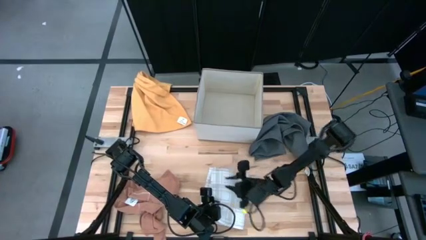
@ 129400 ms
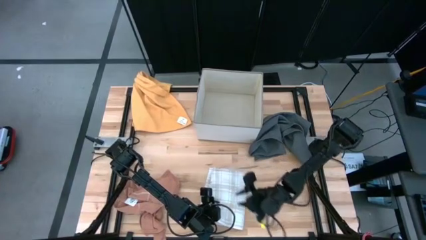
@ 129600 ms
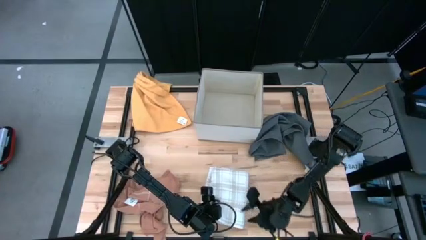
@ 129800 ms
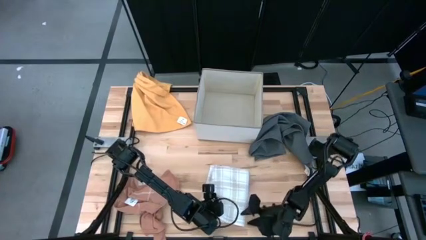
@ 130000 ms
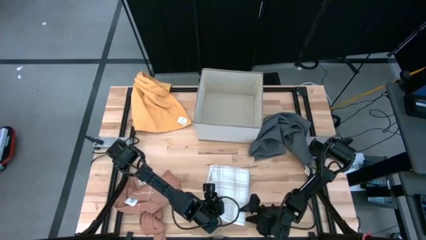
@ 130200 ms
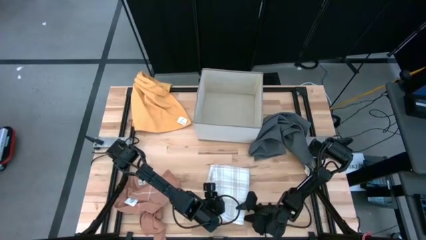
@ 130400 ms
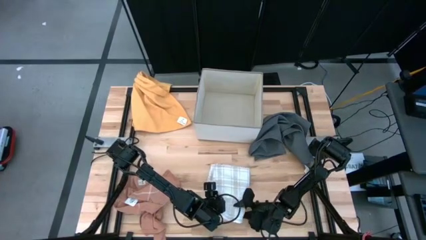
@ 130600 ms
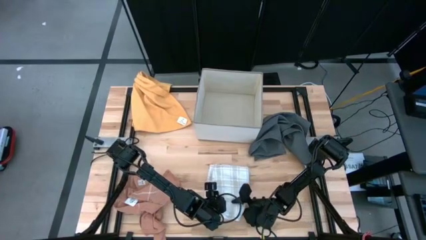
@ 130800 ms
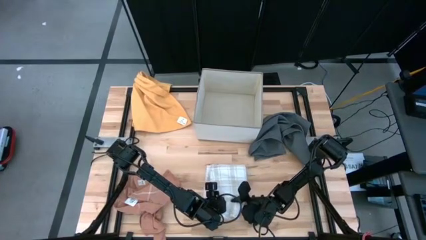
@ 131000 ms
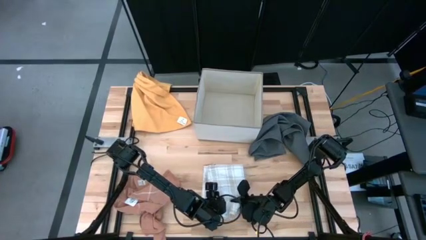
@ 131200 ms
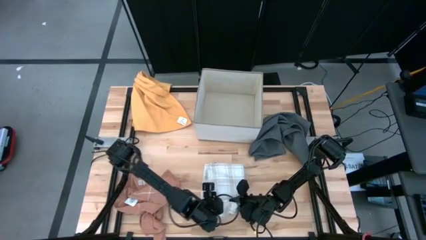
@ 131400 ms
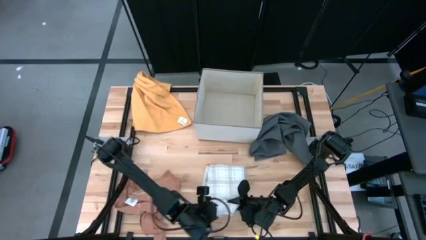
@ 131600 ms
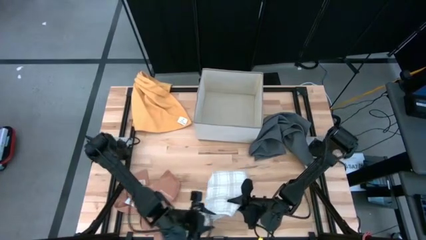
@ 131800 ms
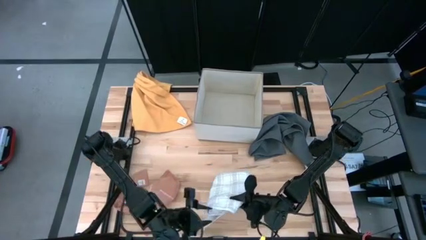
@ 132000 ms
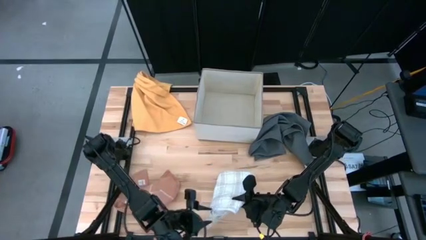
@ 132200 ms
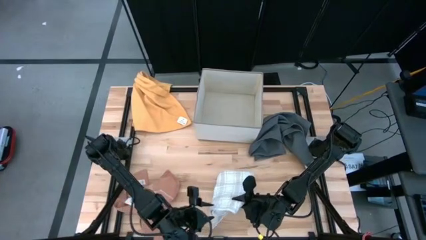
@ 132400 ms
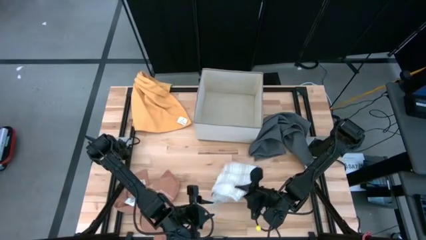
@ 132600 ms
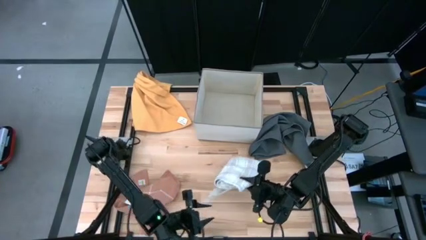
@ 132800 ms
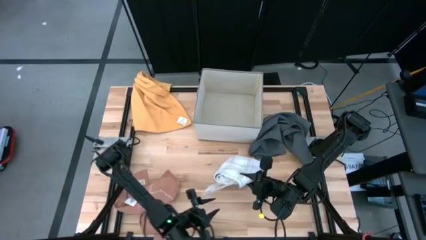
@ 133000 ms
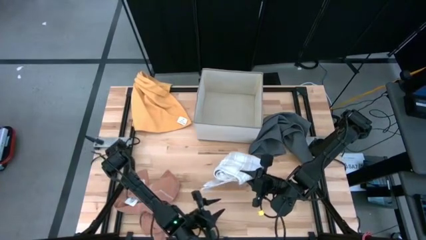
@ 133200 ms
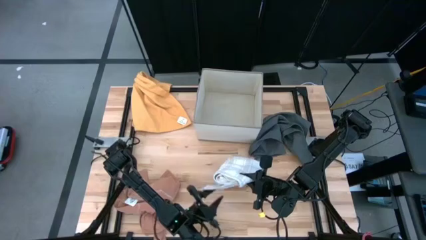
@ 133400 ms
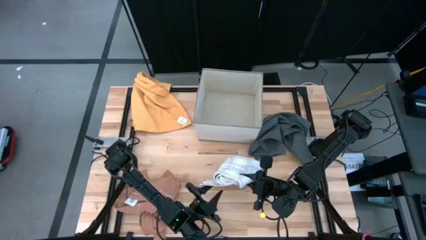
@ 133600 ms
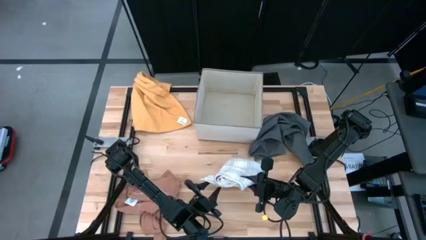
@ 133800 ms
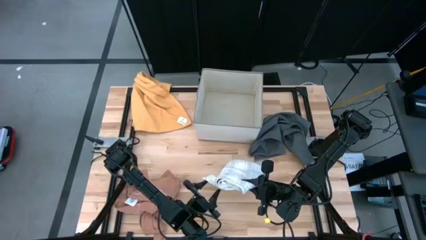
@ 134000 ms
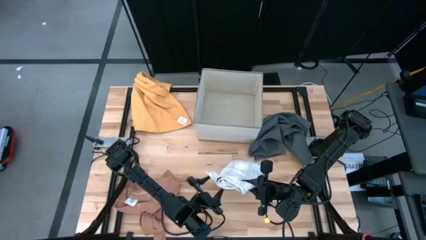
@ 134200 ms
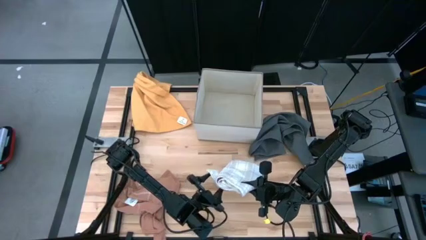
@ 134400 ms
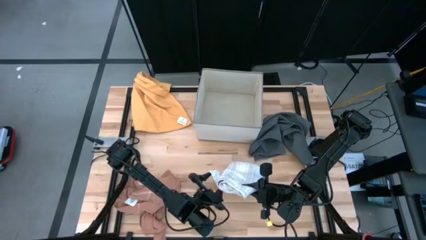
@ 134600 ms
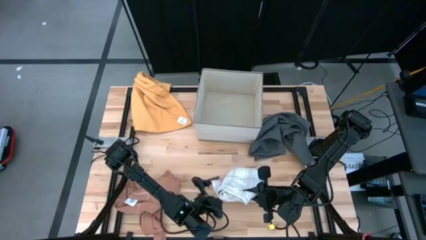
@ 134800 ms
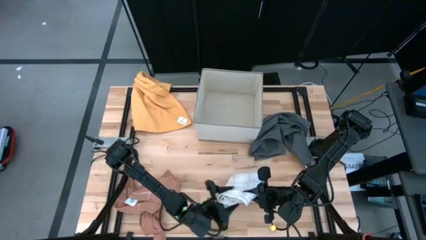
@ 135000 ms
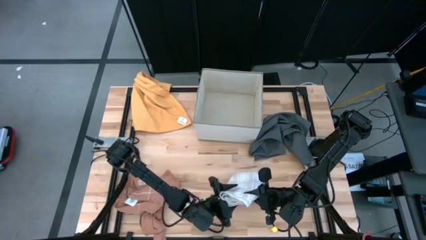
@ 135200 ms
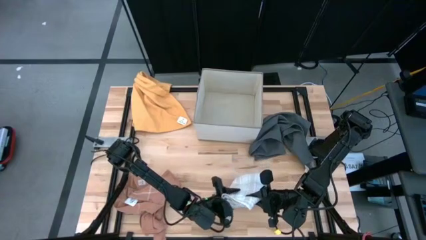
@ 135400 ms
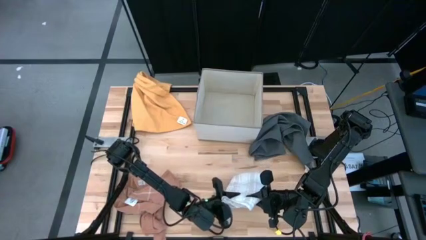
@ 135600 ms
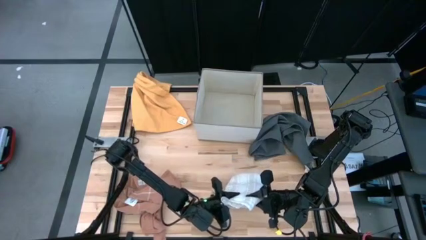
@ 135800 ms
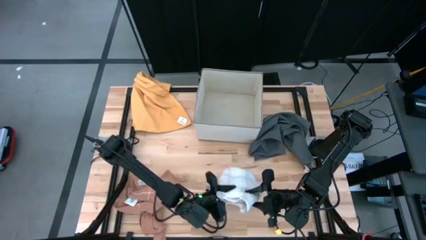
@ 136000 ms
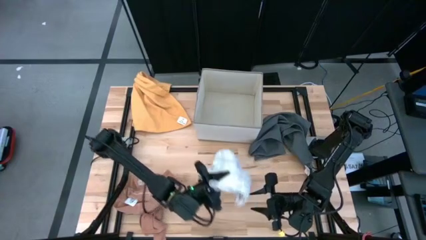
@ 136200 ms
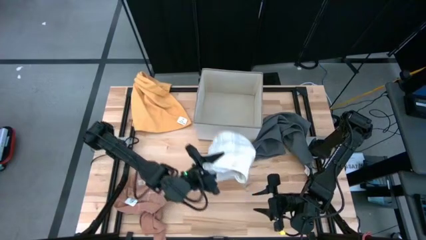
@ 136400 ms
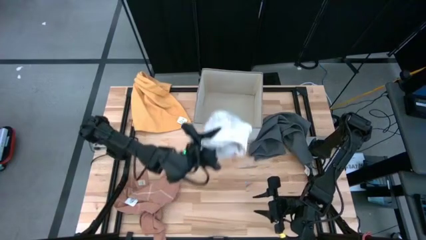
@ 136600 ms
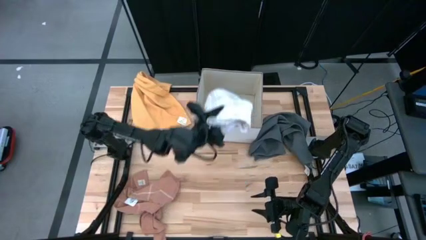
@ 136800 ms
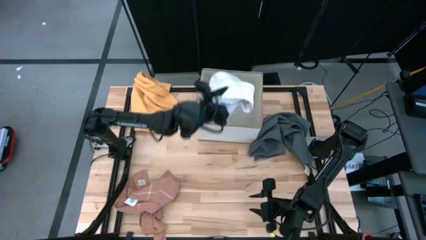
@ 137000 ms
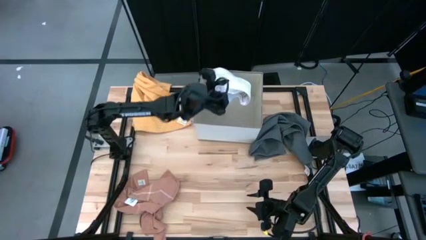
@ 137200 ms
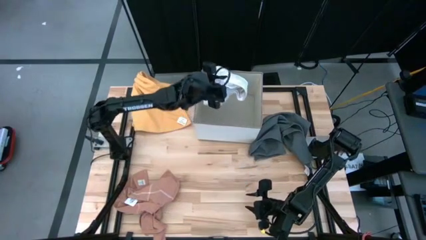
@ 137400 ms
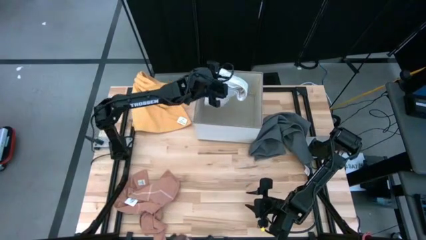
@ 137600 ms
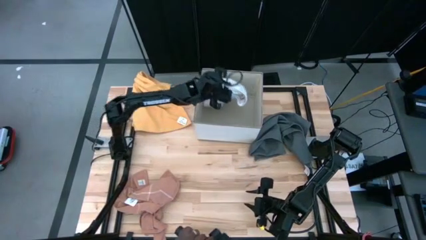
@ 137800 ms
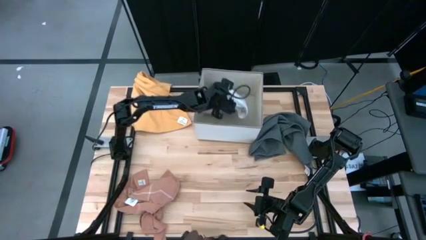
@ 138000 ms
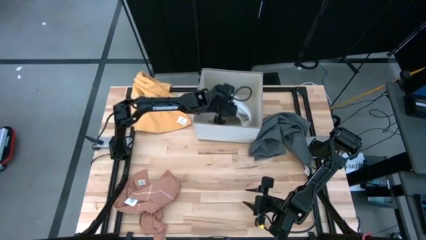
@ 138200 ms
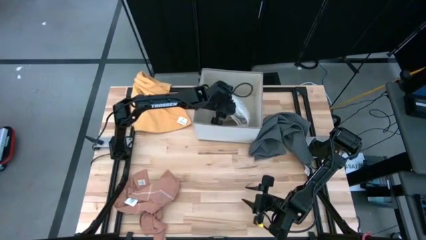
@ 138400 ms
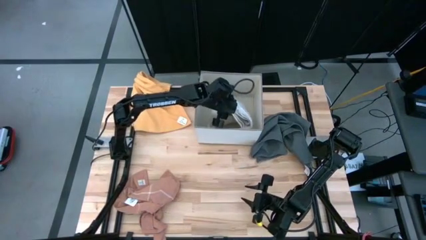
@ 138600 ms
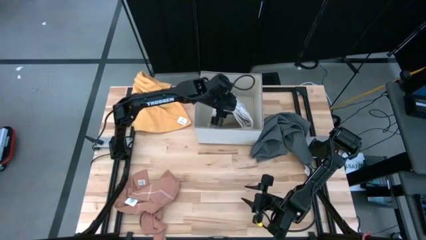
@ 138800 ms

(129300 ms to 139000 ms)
Task: Fold towel
Put the folded white towel into the laundry organizer
